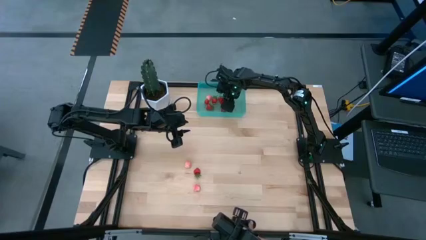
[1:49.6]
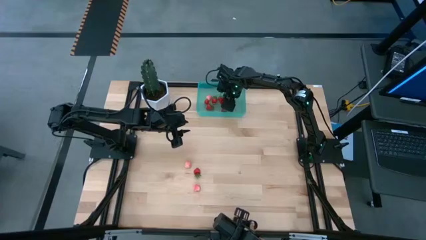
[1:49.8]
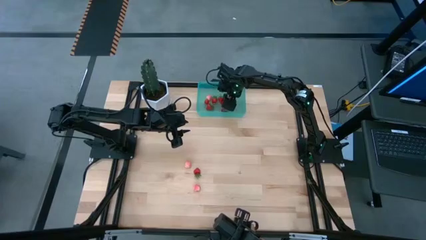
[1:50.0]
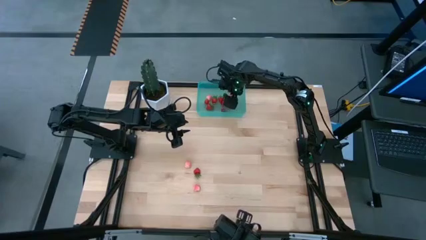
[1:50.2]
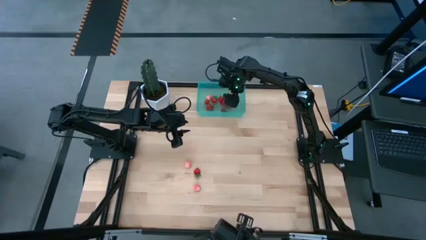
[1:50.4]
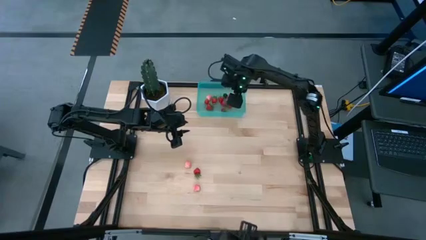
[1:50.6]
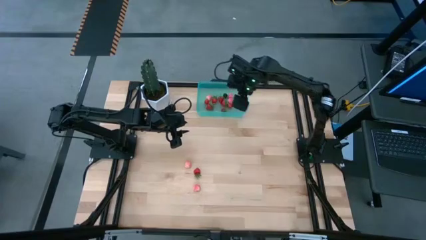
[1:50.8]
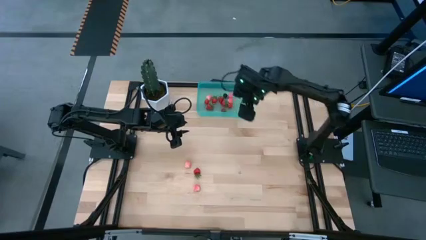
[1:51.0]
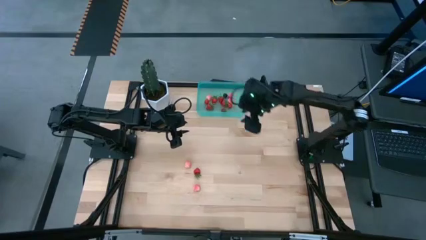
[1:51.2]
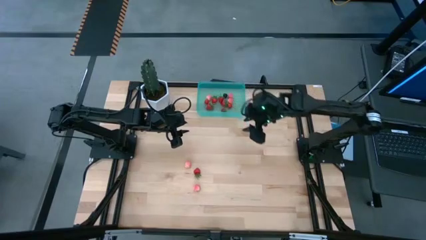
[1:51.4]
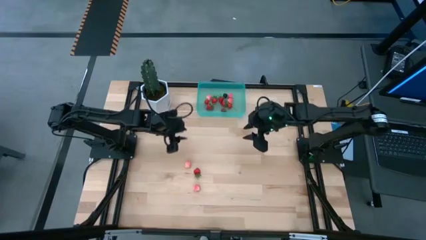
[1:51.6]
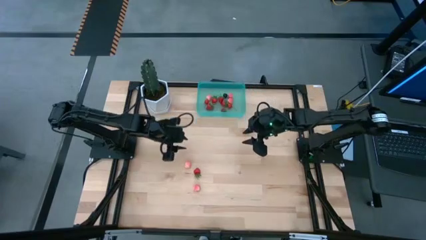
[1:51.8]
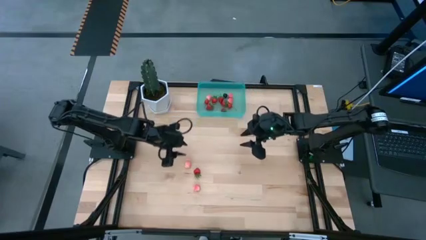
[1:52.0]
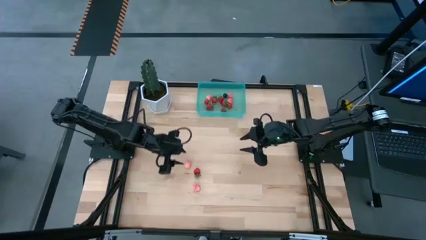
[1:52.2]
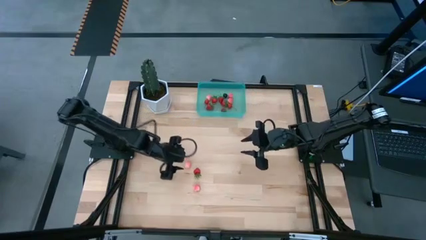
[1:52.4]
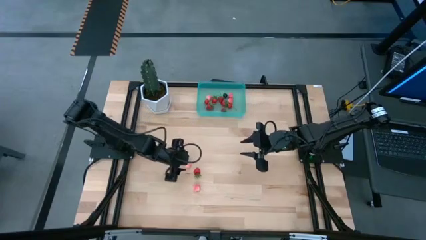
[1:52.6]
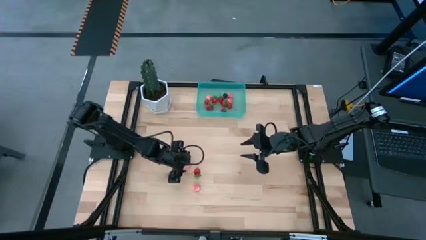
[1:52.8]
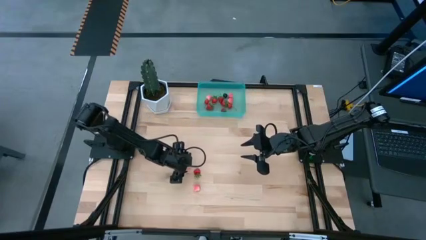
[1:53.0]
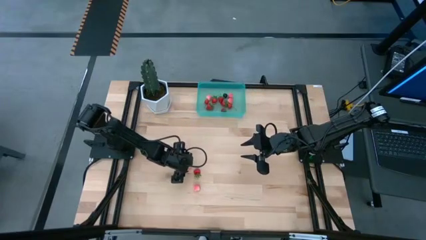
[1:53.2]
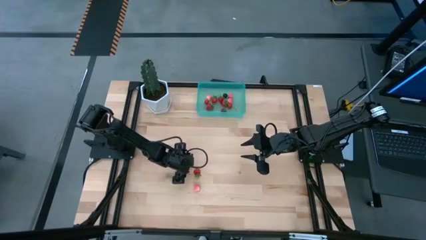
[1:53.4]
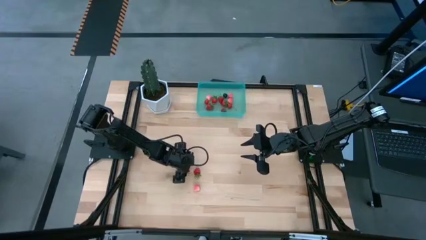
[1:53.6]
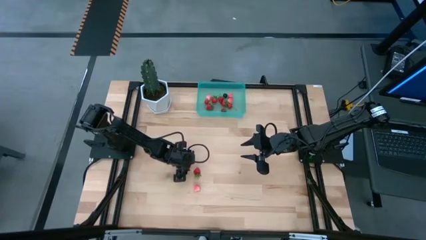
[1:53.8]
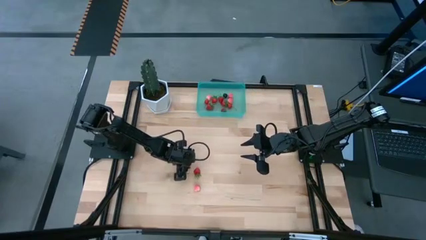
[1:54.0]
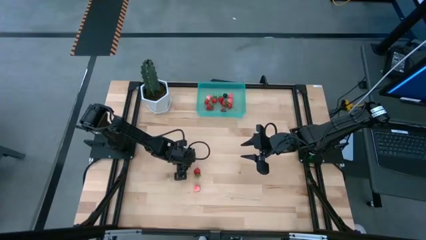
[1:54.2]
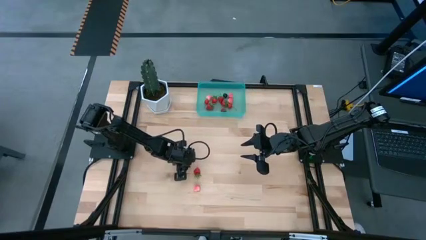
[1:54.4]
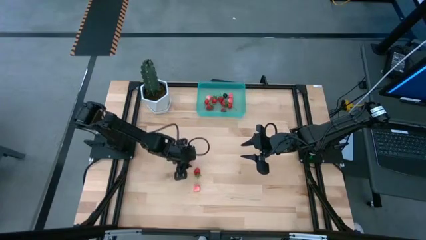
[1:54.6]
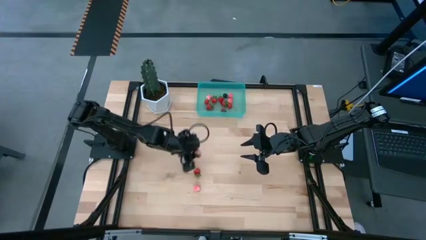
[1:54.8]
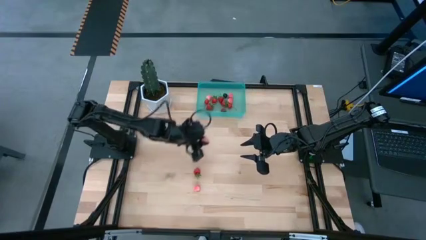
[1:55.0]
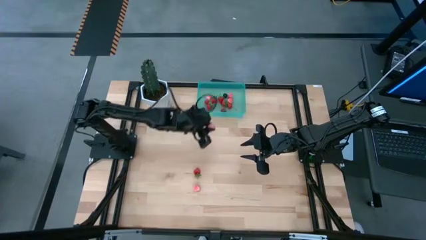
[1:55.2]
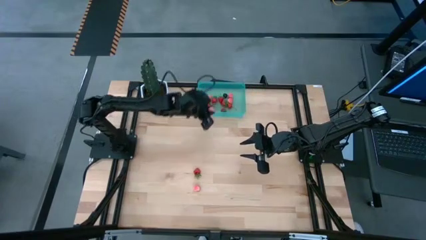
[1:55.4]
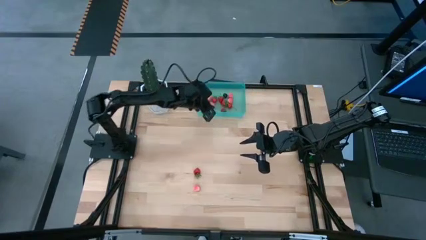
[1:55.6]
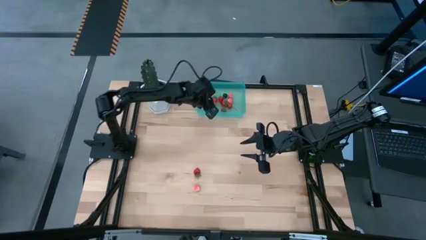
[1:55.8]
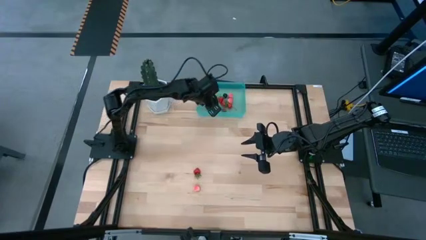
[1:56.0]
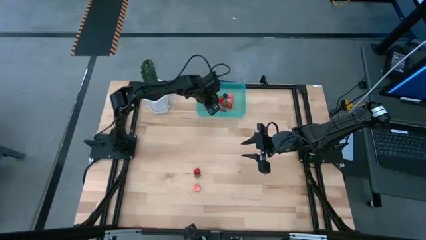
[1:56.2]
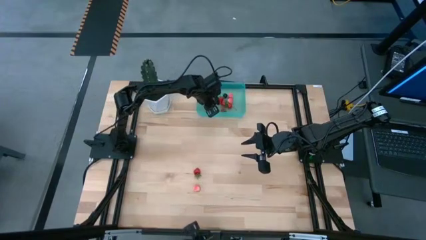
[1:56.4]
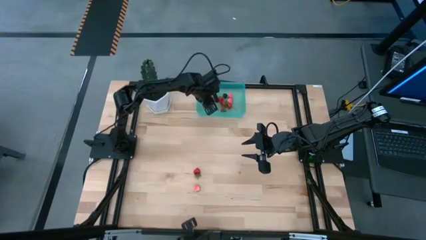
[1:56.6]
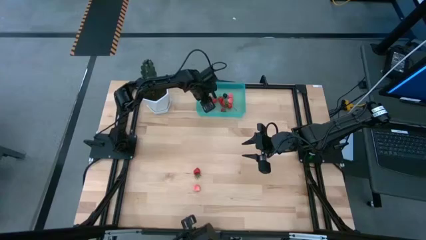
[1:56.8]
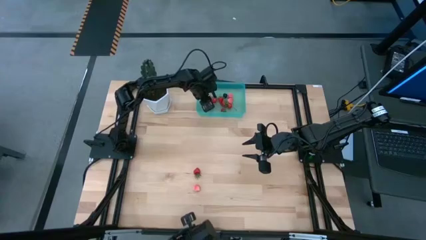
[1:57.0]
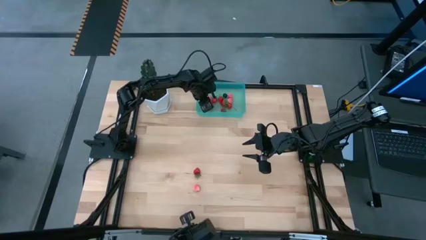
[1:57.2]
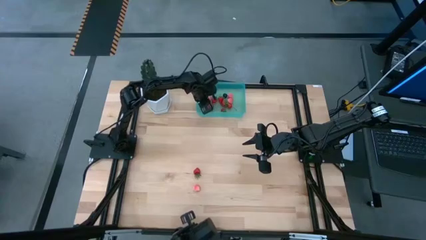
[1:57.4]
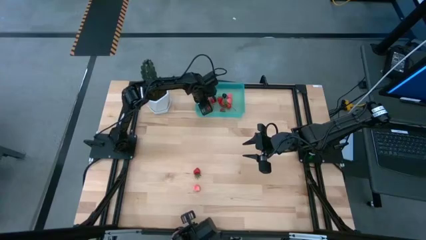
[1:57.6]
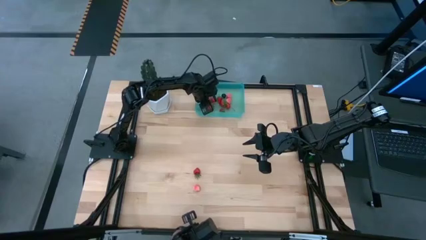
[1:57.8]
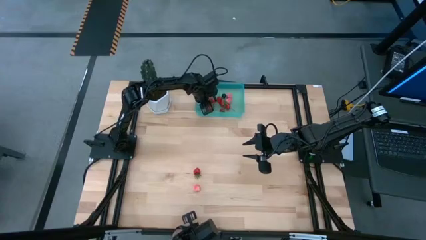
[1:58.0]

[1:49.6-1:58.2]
Task: Pick and placing Produce into tupperware
Put the peach into the container

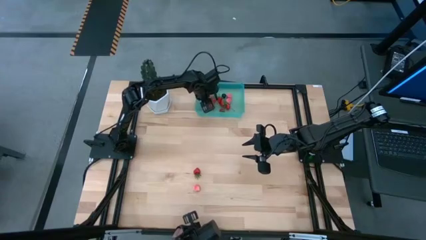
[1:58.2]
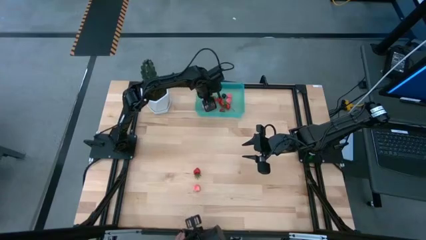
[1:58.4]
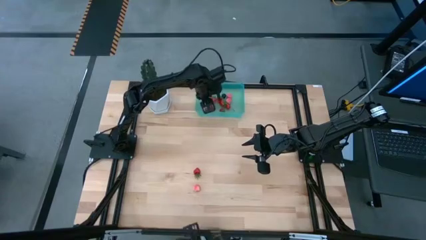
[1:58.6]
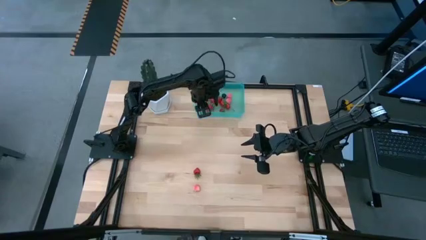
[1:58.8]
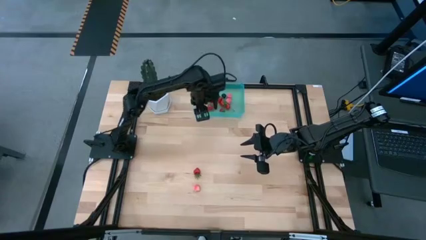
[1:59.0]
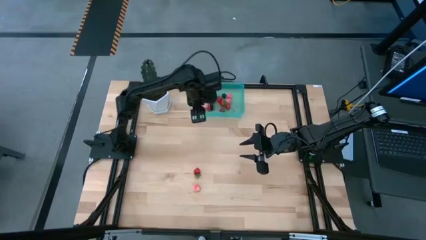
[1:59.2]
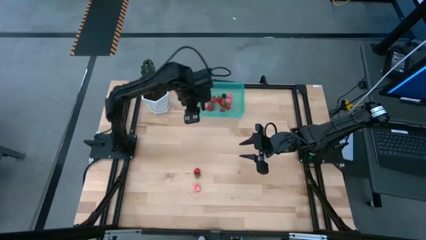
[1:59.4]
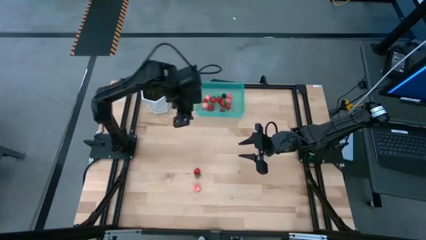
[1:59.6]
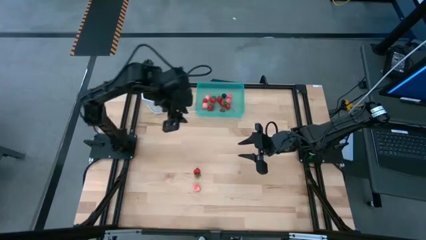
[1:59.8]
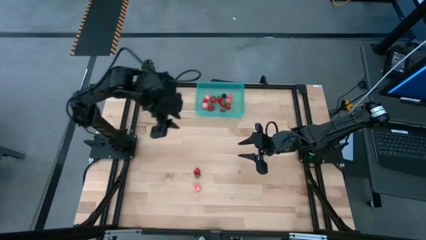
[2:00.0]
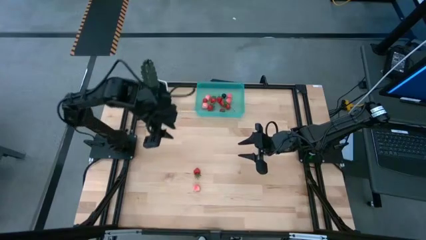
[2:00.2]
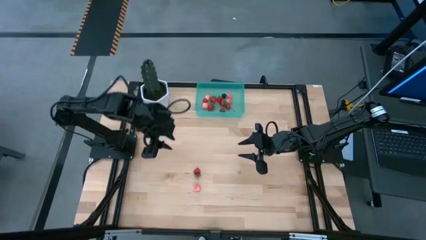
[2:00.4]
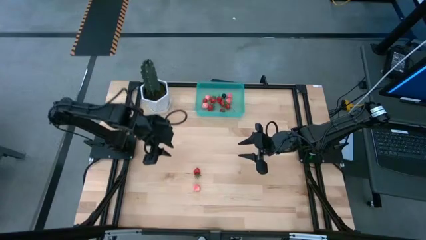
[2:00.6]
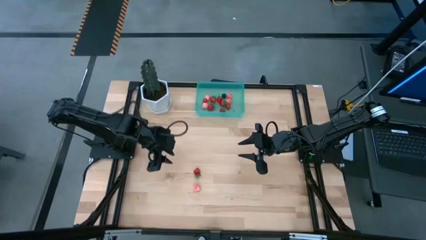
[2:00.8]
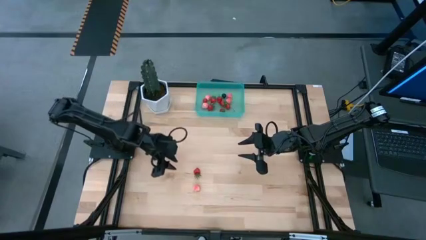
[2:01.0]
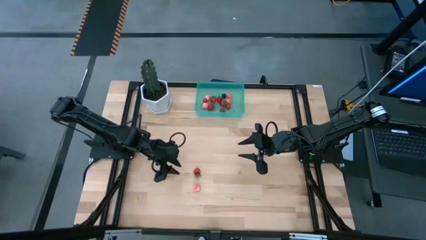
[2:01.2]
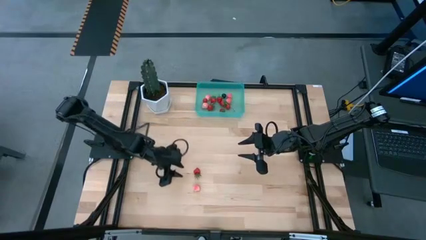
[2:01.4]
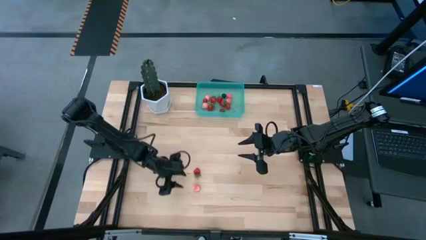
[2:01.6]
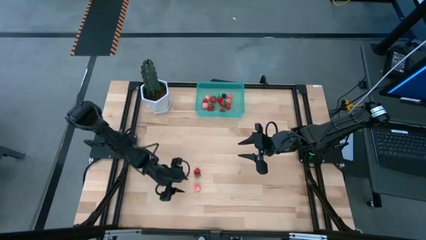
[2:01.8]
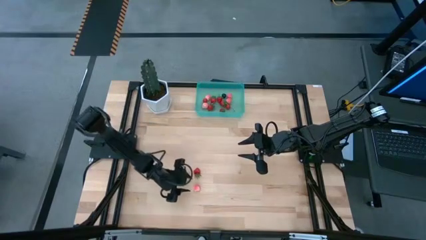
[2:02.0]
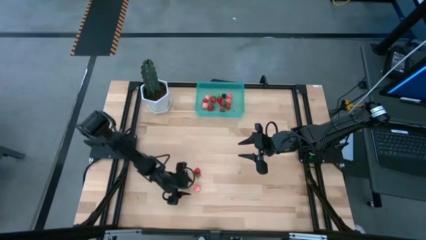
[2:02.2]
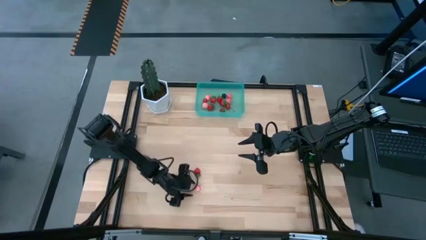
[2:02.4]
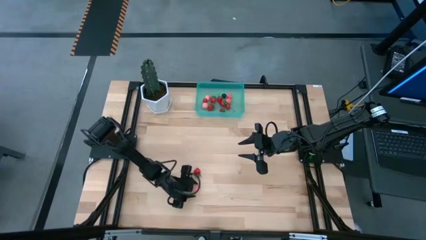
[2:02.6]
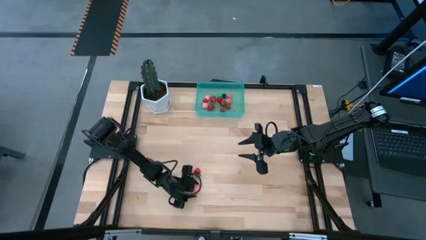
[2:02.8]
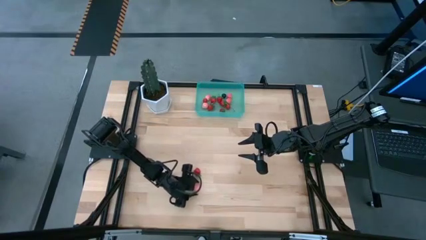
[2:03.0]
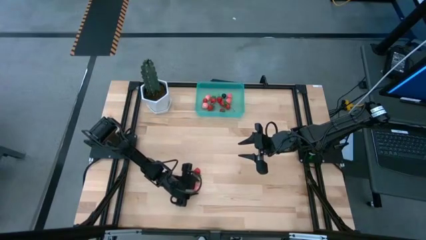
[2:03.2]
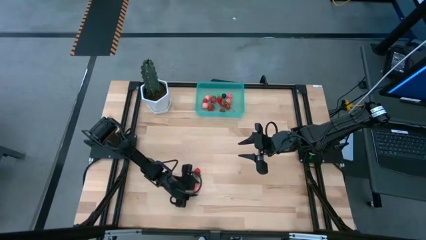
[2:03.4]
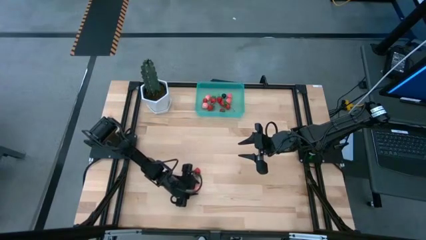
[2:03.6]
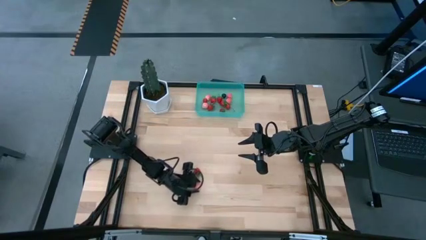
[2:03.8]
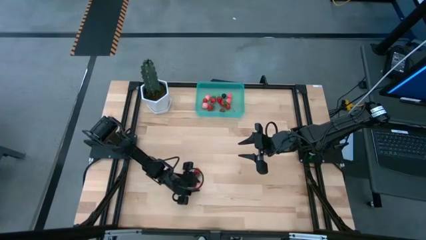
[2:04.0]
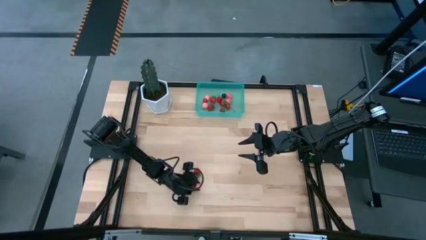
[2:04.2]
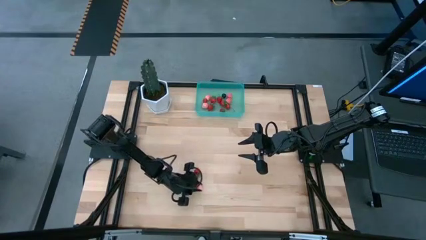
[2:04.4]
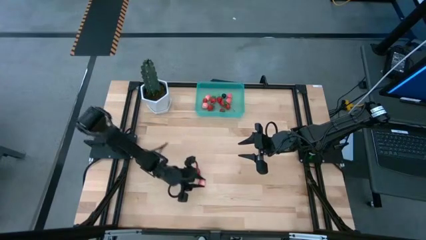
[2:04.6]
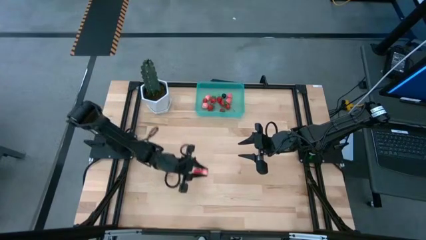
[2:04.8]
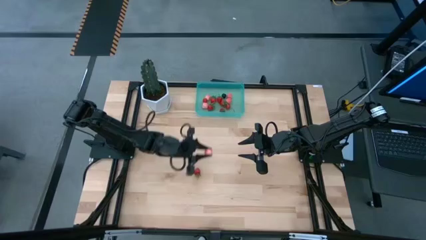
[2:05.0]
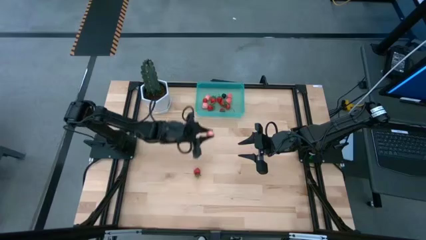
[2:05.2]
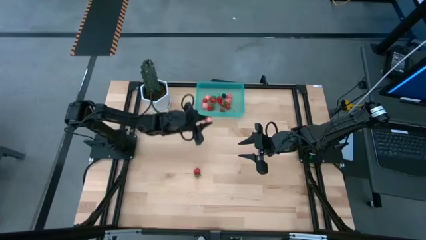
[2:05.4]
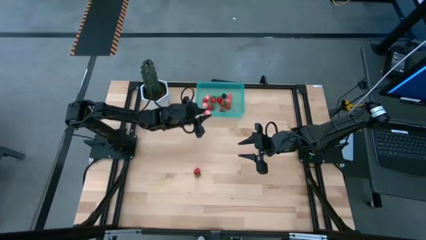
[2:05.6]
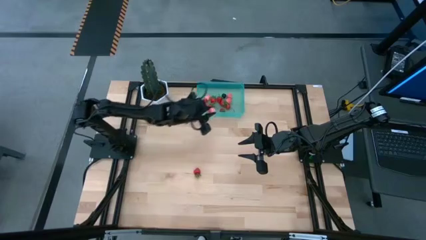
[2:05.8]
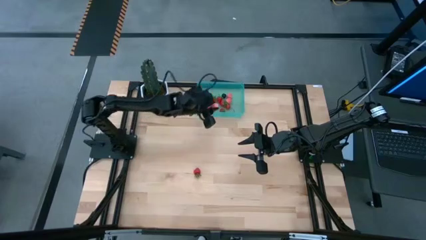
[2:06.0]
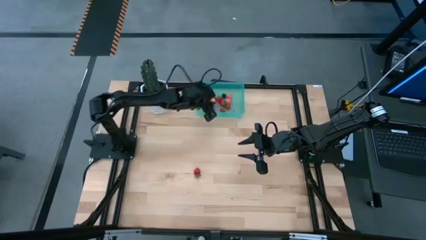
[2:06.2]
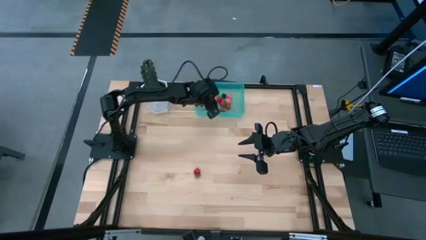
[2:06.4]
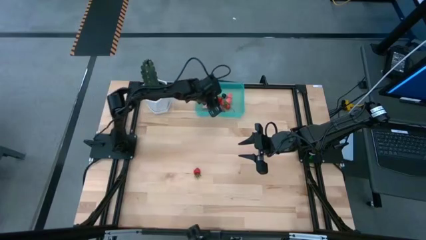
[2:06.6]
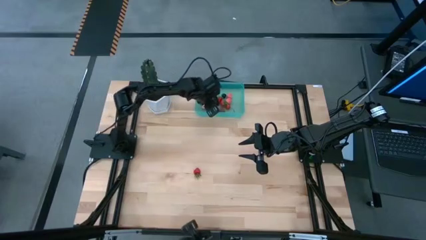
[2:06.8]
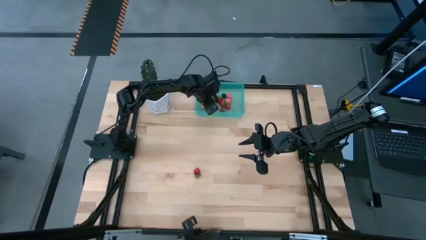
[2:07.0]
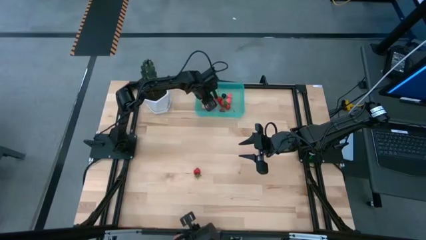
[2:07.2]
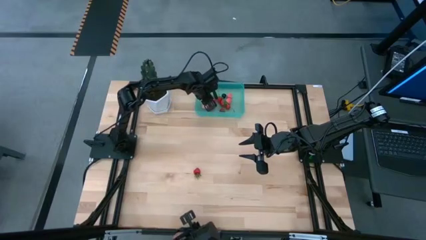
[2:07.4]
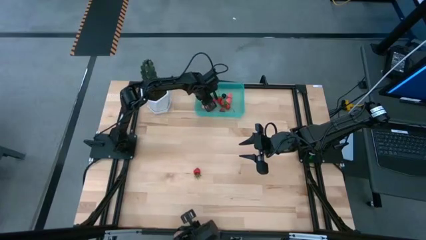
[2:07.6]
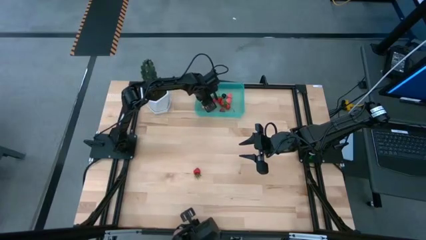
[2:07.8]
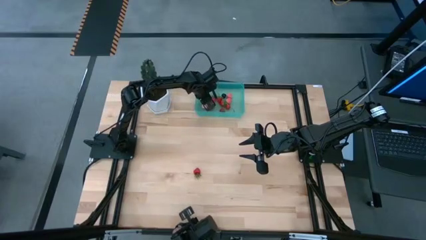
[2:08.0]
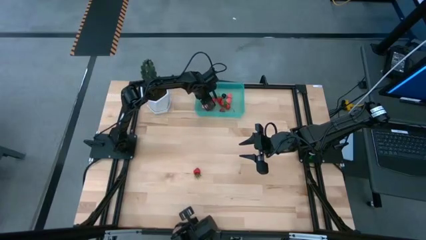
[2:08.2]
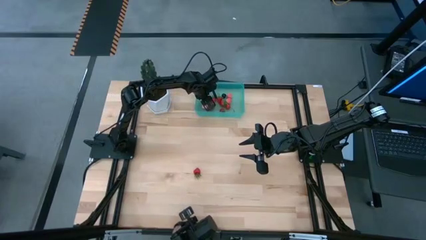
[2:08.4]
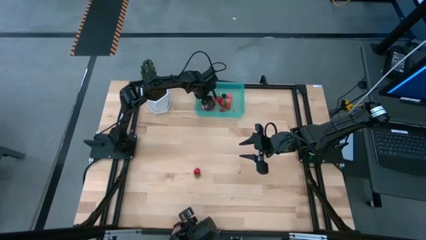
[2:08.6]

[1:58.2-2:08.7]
Put the peach into the container
